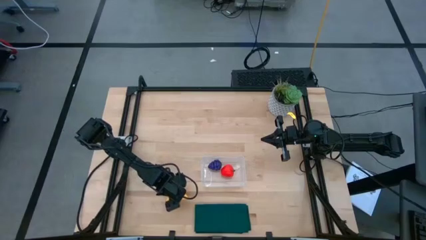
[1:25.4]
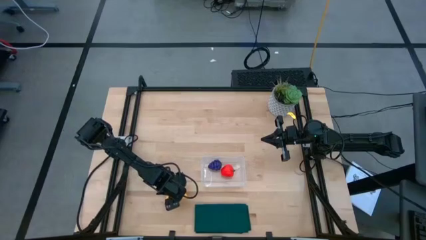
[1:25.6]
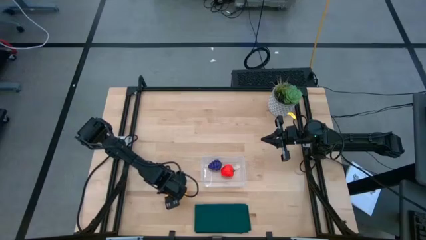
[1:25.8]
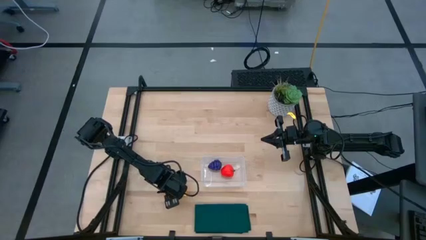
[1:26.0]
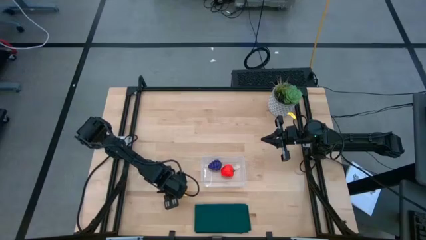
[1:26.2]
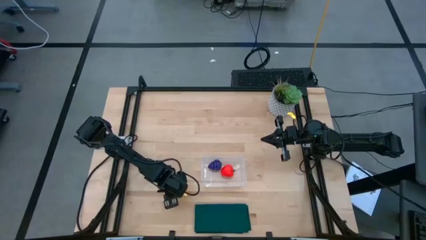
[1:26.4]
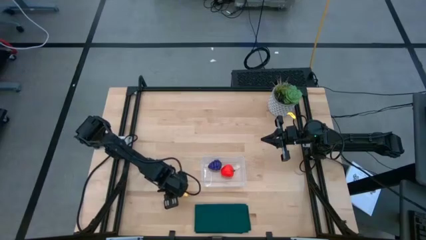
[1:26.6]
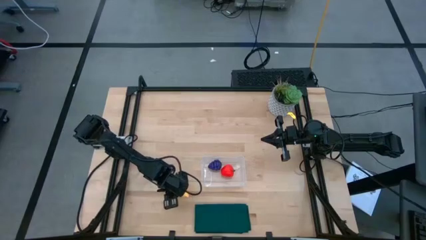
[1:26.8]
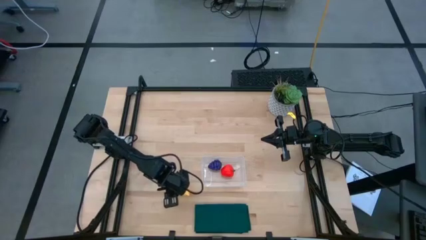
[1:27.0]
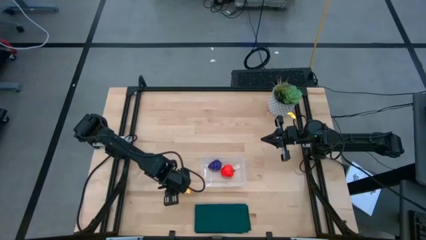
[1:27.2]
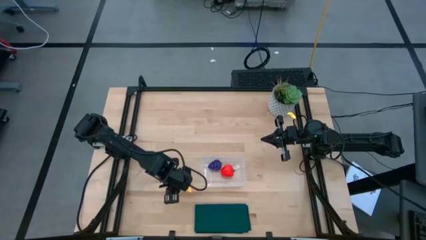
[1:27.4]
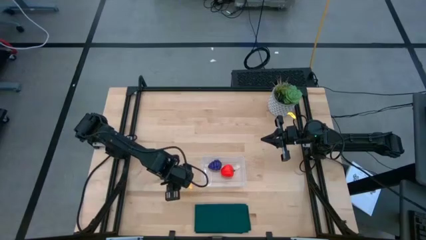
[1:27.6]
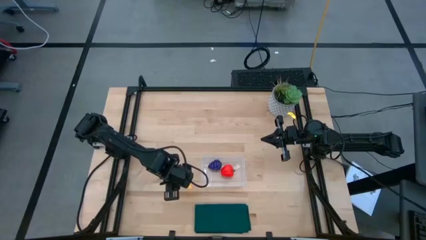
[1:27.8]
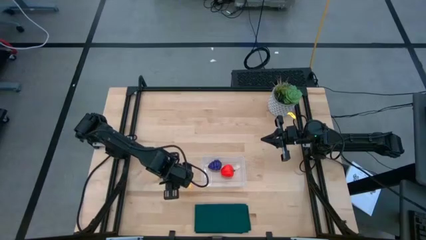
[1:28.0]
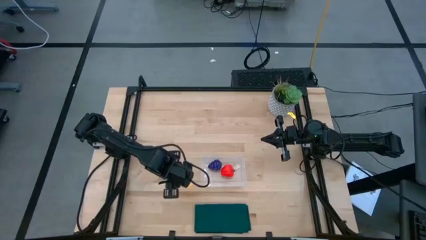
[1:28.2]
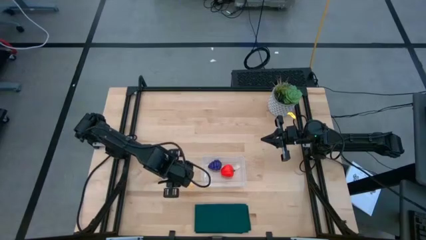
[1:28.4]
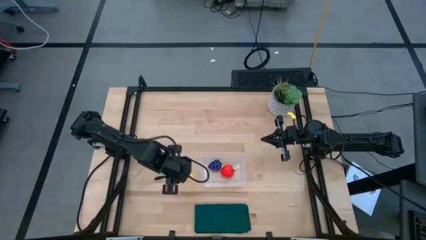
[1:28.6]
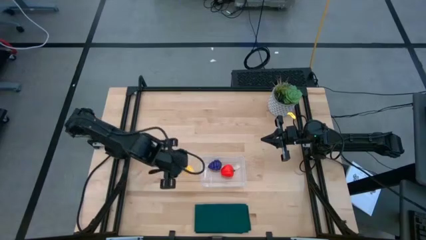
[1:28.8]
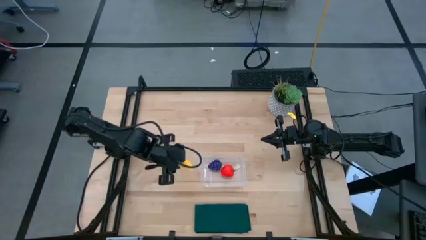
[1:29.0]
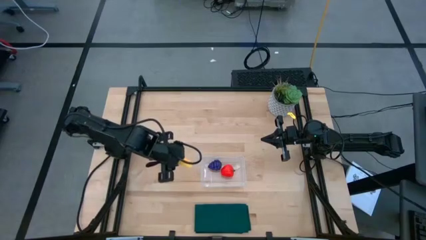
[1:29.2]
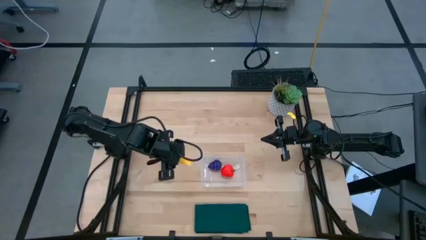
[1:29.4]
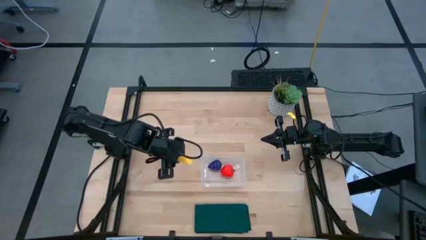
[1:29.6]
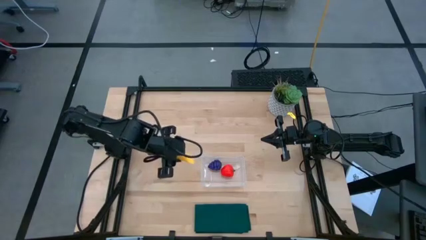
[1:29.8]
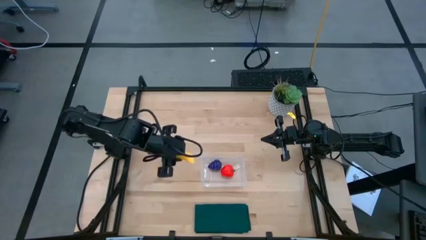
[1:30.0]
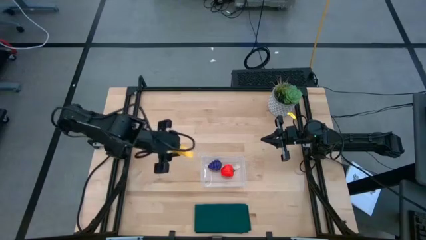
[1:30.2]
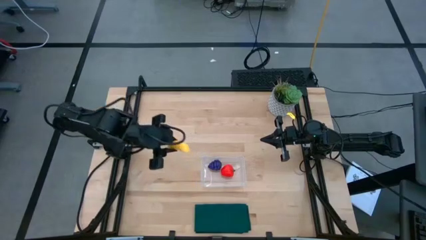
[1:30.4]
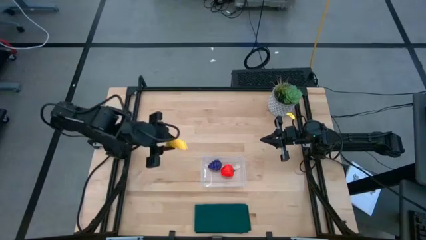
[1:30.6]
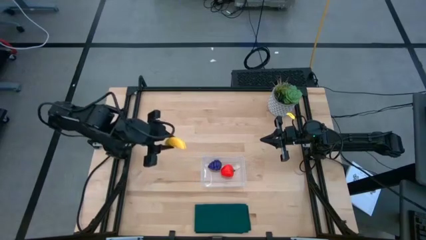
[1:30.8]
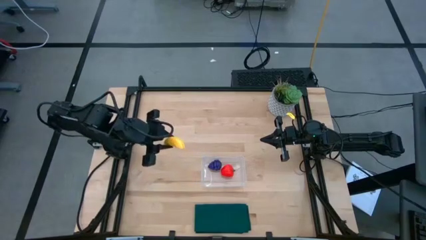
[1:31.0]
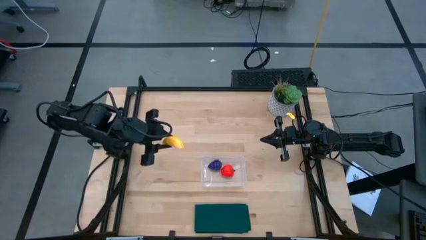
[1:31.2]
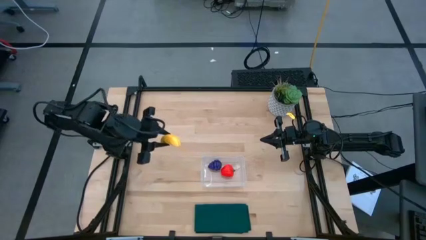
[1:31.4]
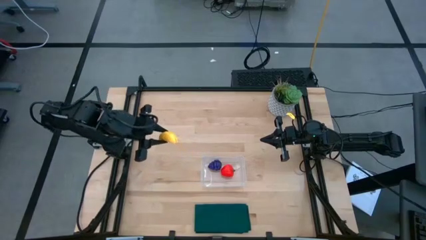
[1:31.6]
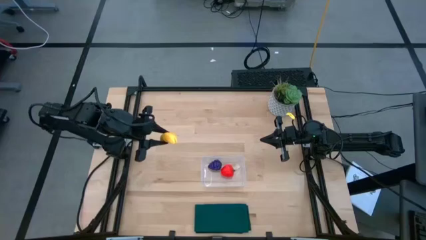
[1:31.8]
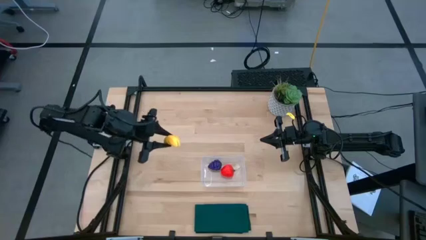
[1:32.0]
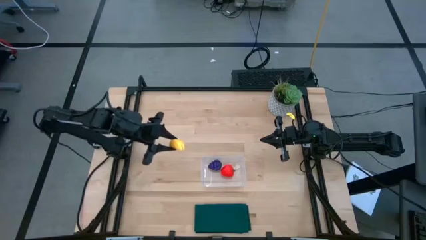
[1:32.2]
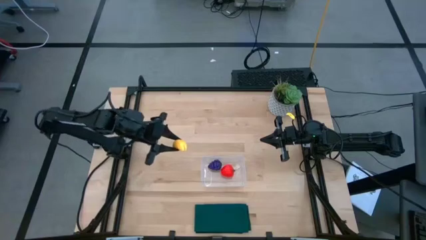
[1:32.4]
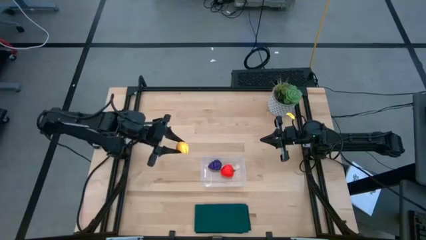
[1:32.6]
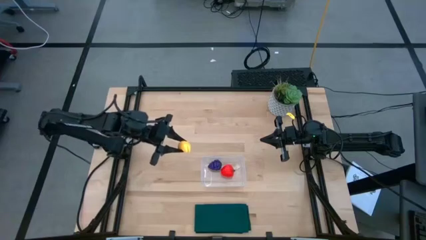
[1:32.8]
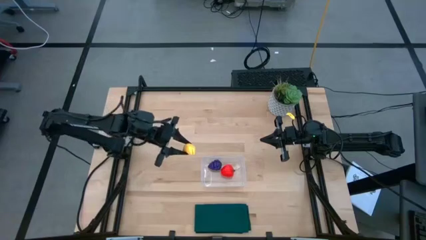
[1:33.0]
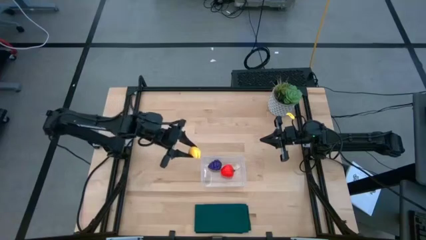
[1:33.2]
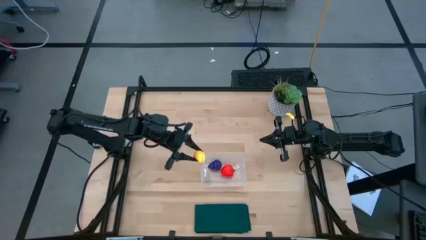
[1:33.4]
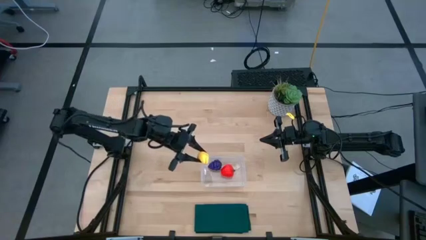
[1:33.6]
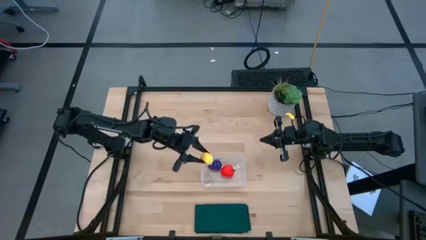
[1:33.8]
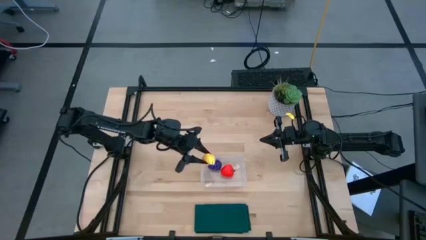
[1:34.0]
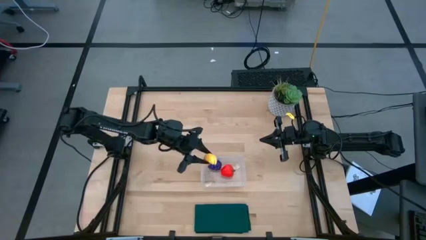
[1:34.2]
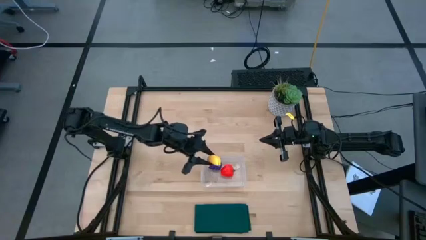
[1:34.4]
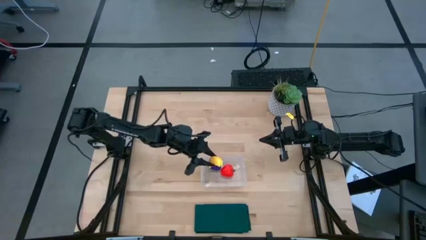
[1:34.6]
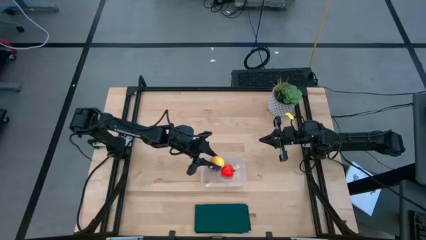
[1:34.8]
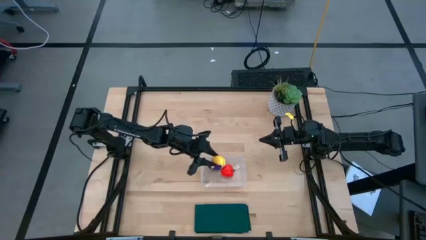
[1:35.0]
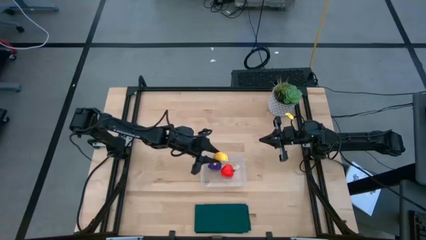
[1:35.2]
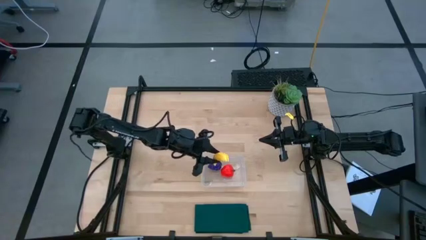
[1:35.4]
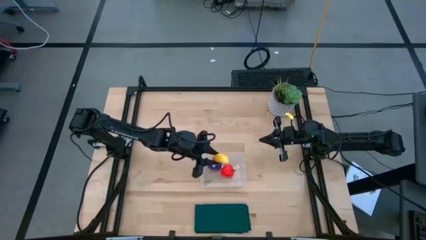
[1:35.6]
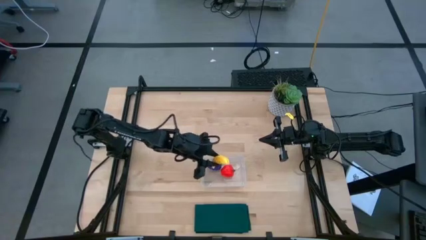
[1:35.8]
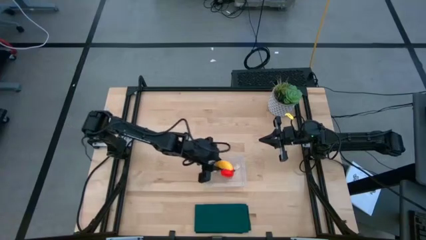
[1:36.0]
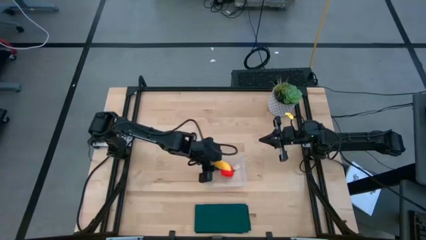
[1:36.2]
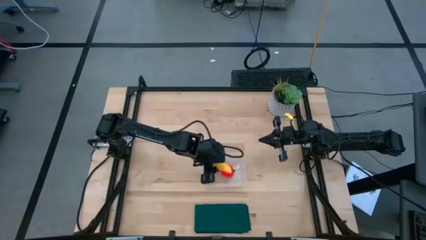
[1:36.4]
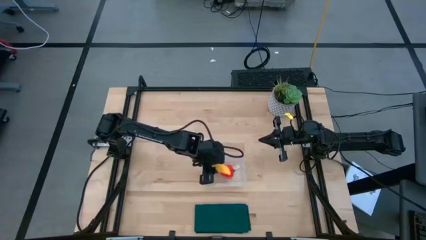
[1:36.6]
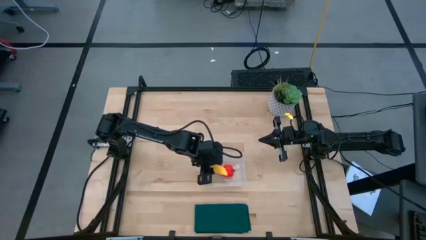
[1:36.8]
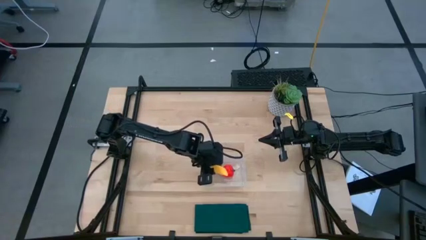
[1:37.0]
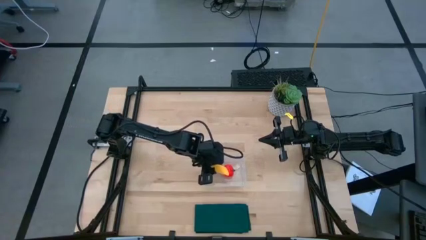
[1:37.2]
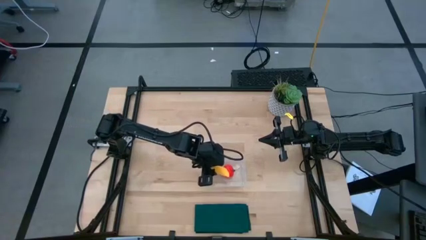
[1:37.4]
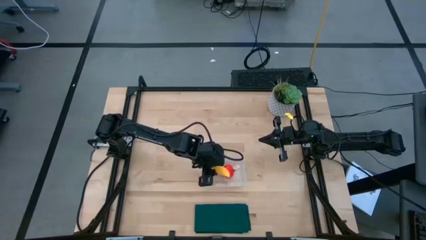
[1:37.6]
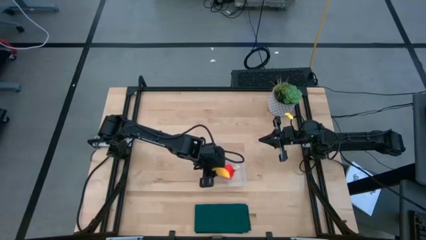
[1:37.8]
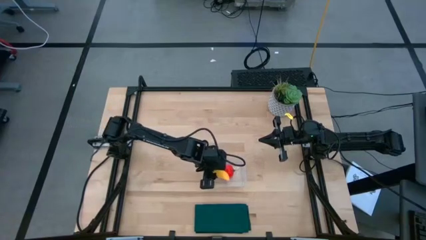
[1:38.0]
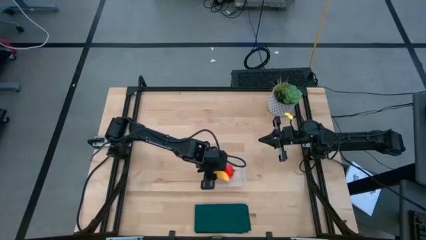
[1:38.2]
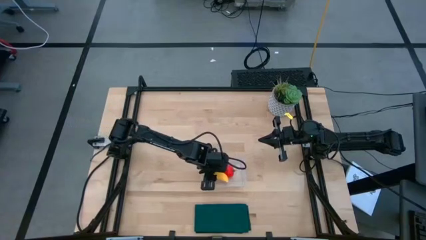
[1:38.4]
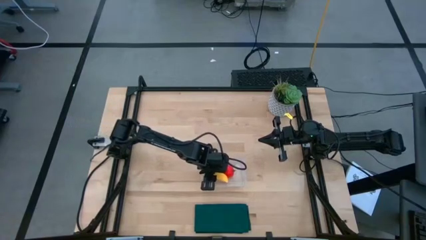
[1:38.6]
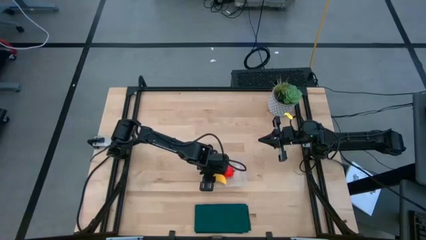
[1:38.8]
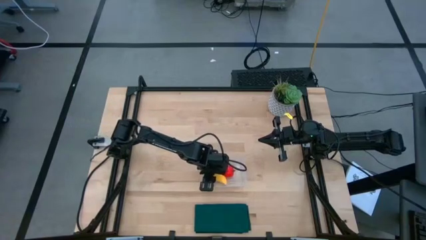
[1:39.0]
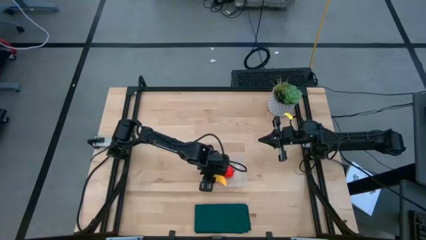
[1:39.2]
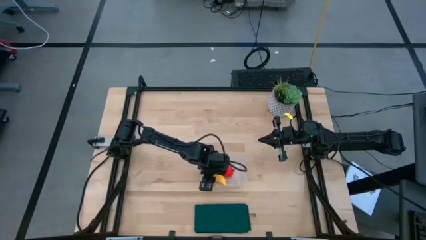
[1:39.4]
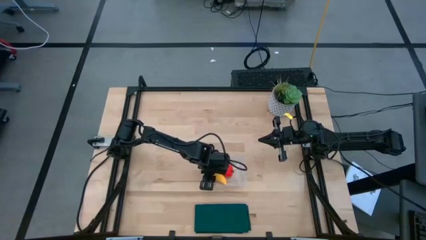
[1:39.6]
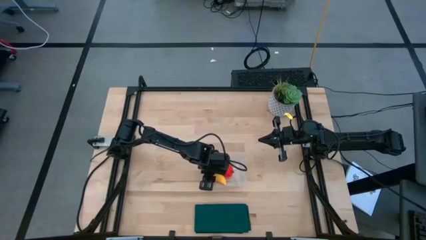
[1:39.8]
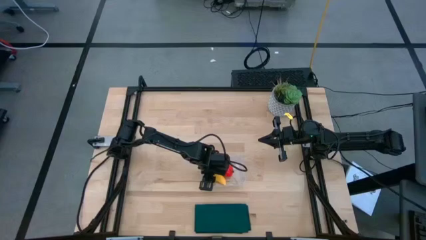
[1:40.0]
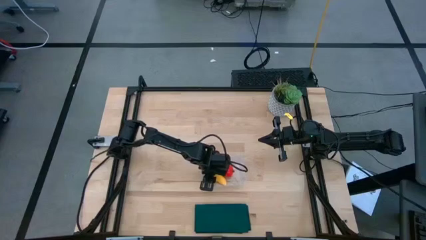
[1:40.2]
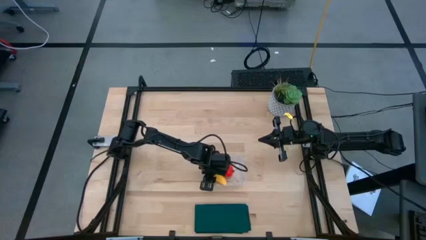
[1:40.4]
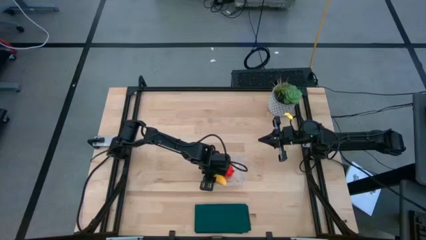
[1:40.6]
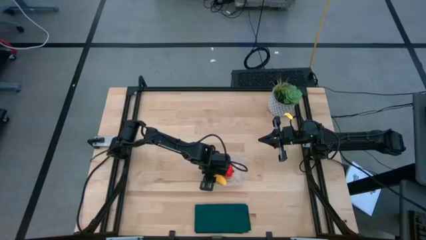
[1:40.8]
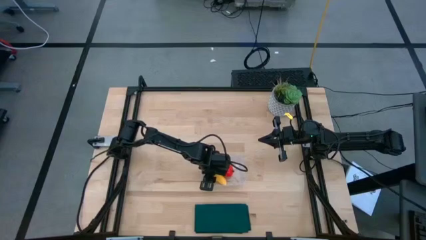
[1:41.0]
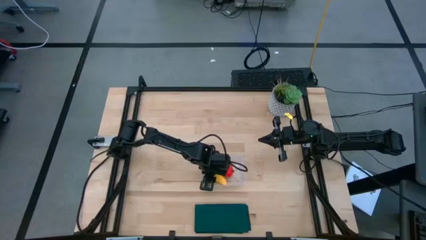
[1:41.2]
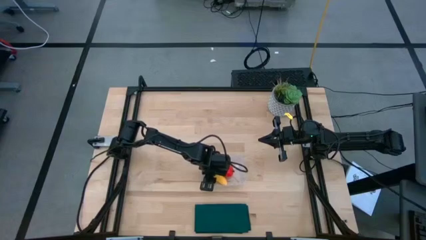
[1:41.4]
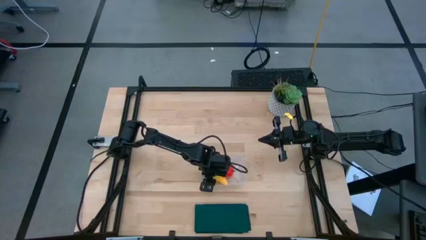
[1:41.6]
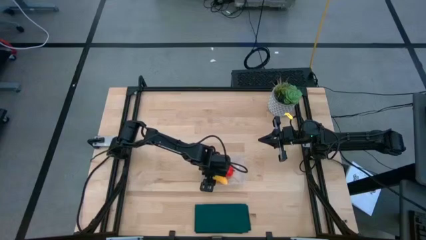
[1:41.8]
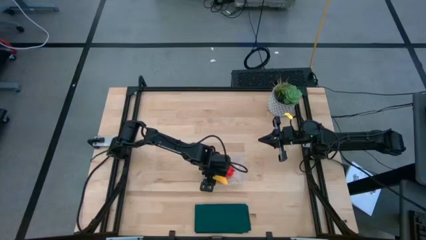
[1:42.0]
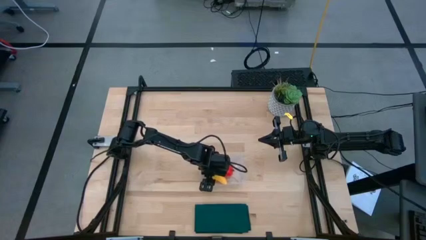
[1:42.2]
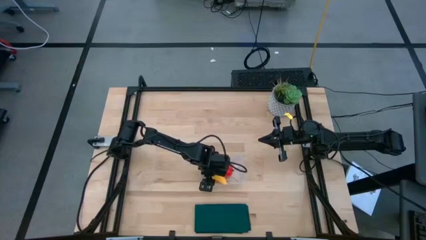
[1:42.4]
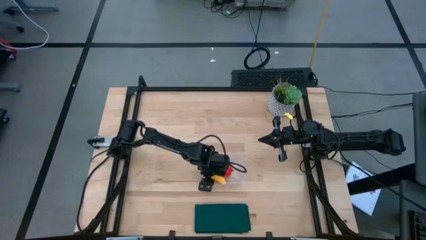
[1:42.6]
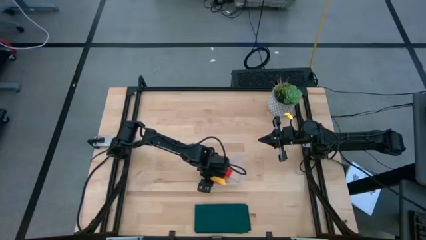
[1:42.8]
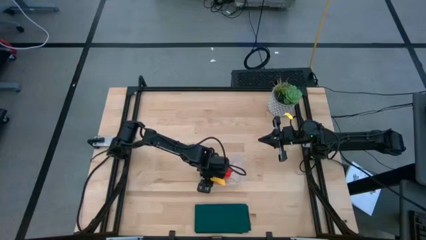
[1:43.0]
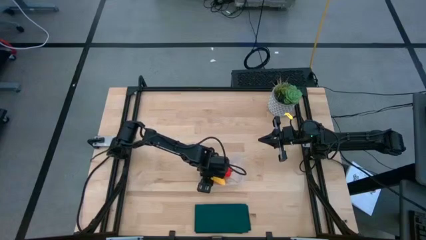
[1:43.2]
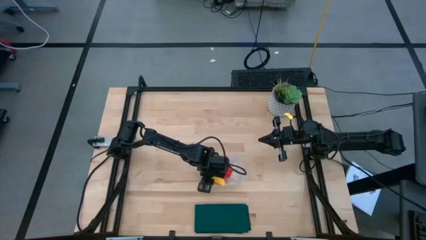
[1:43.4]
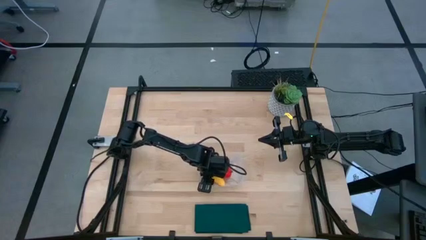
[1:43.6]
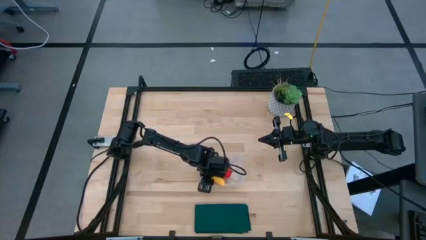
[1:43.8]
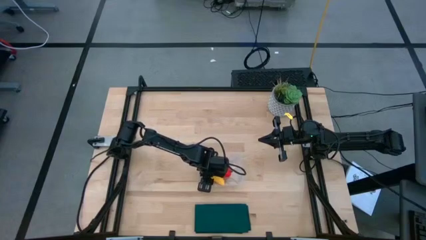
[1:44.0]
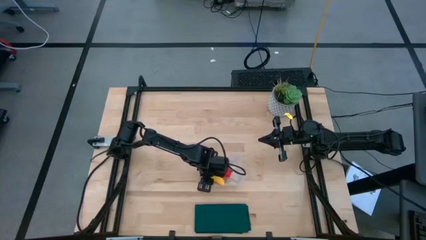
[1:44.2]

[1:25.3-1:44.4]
Task: Pick and placing Produce into tupperware
Put the banana into the transparent bin
